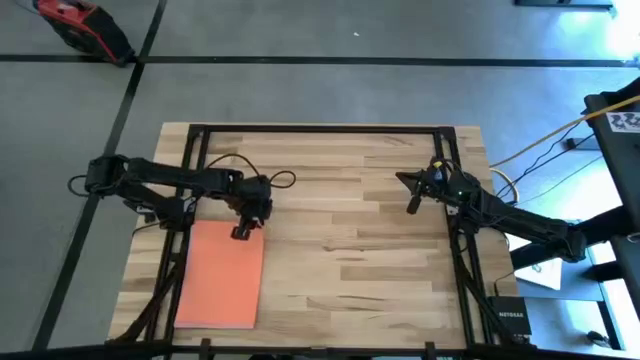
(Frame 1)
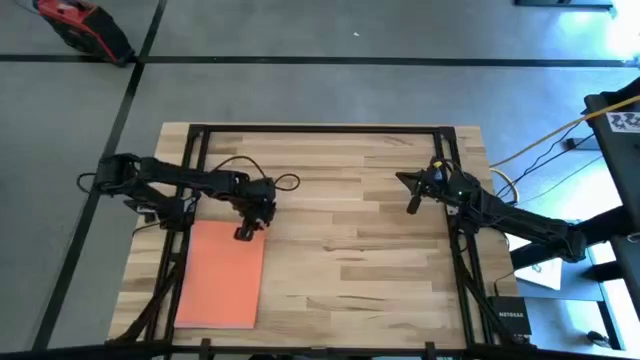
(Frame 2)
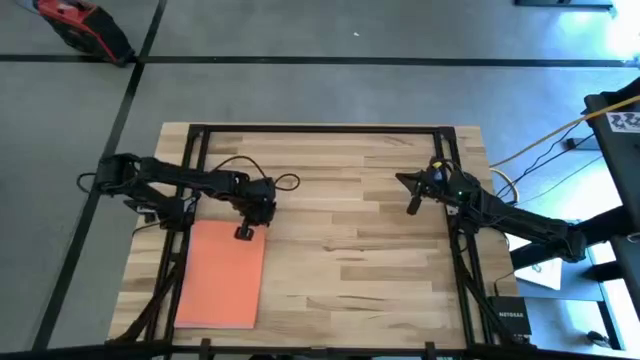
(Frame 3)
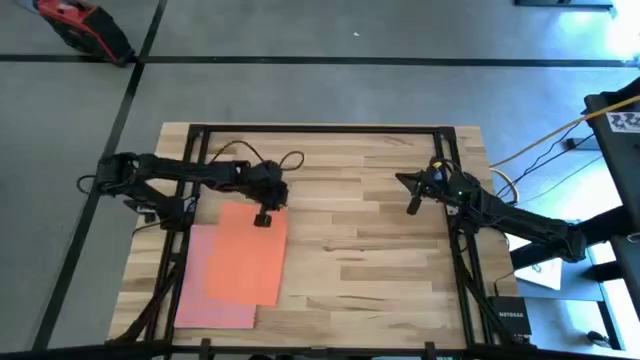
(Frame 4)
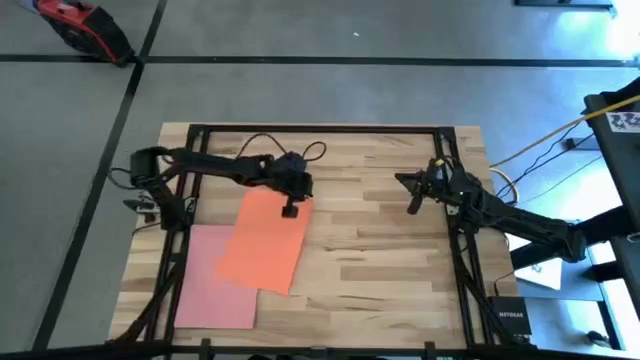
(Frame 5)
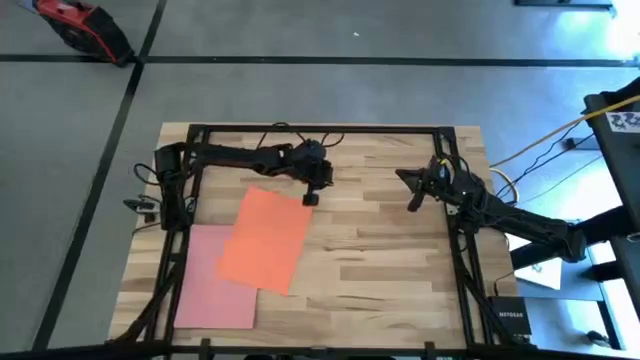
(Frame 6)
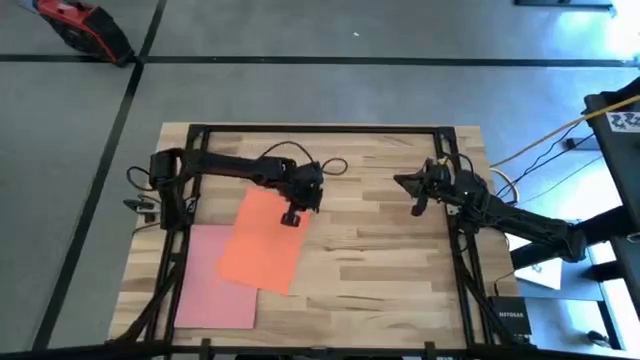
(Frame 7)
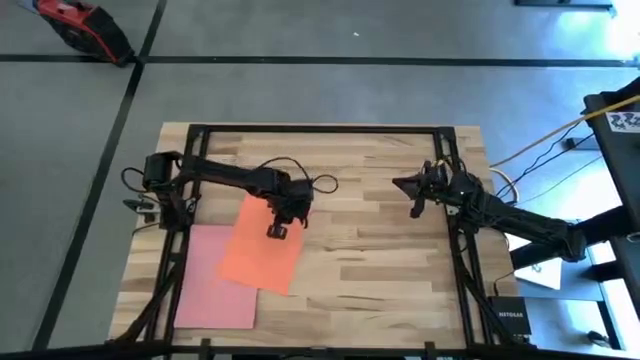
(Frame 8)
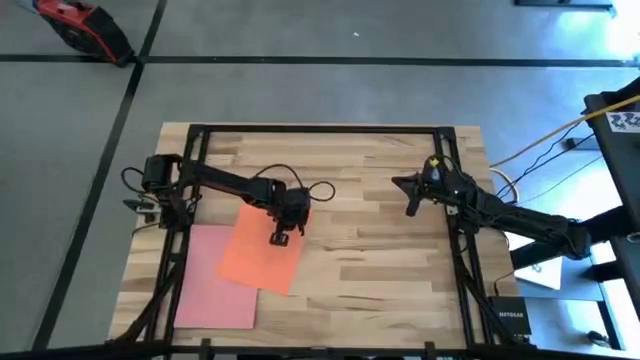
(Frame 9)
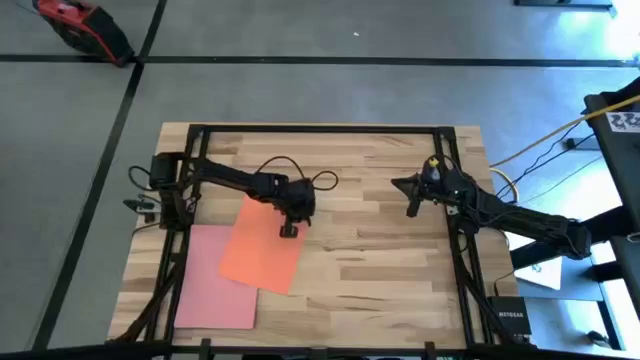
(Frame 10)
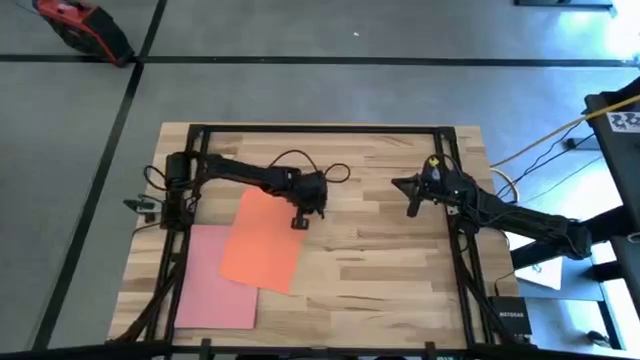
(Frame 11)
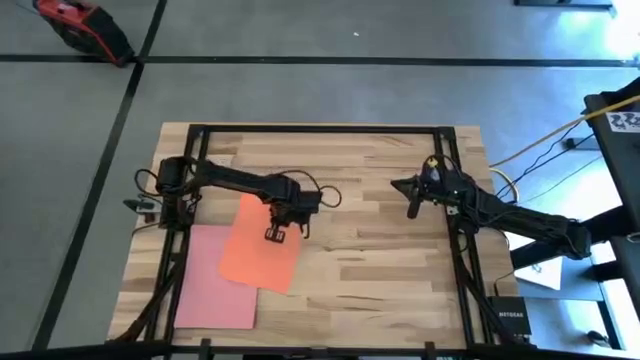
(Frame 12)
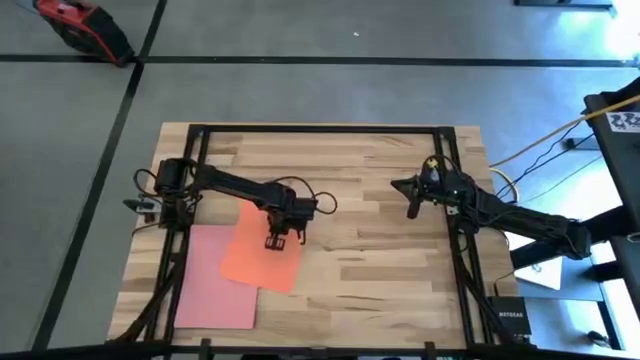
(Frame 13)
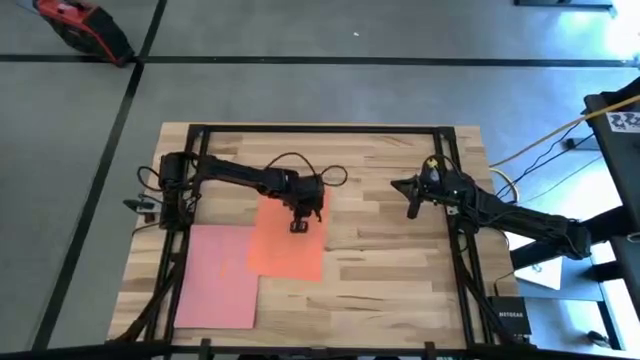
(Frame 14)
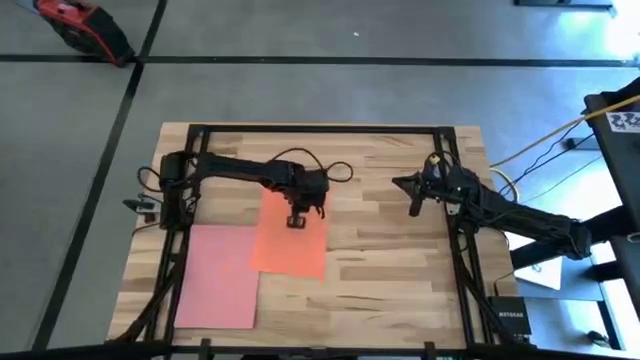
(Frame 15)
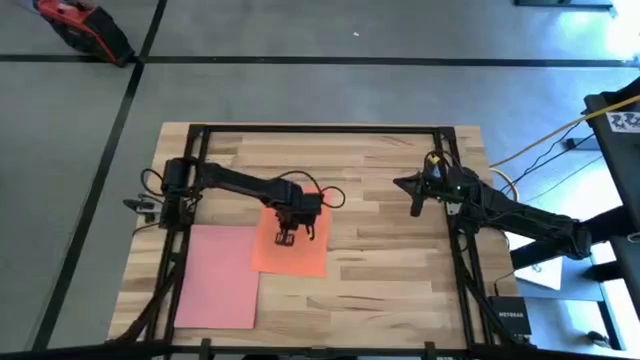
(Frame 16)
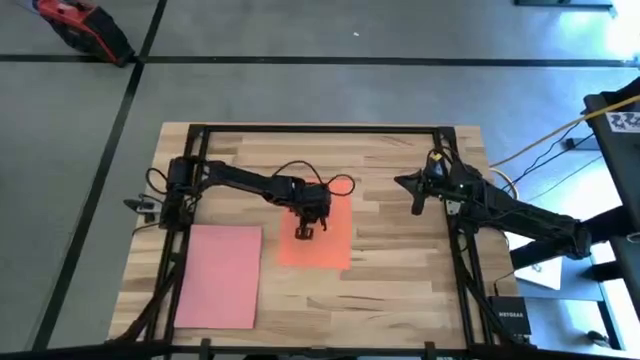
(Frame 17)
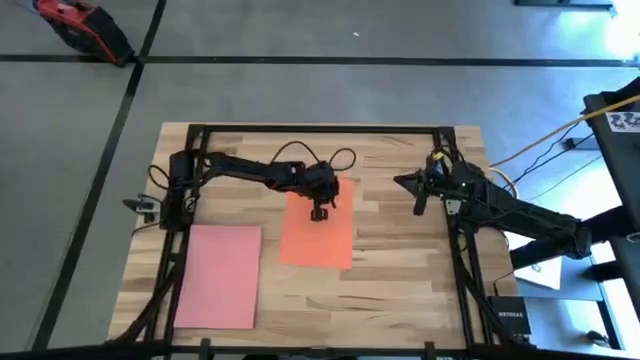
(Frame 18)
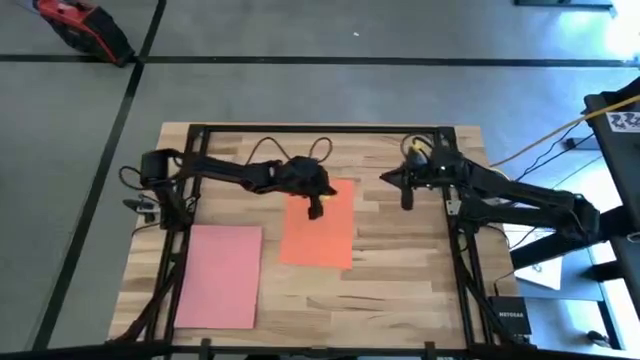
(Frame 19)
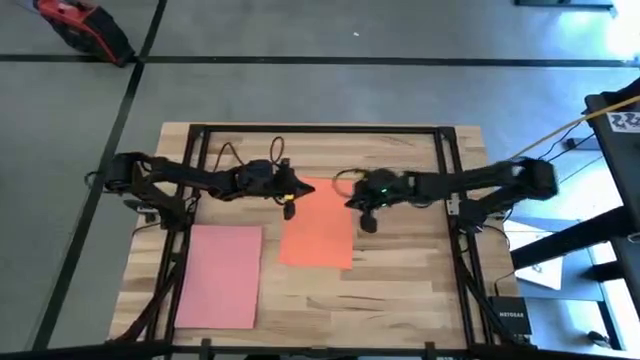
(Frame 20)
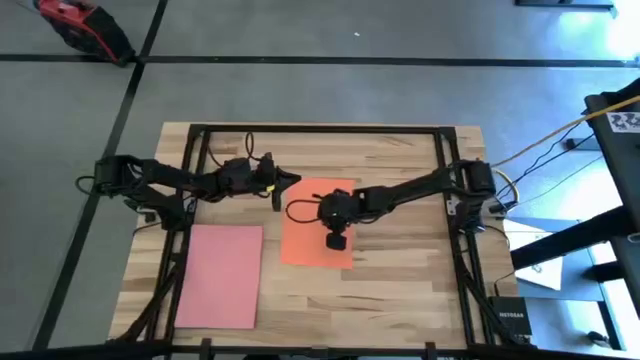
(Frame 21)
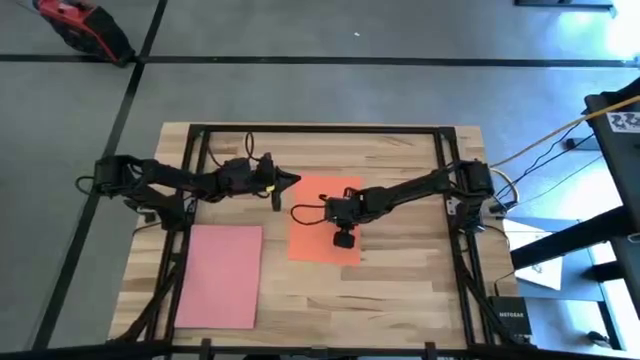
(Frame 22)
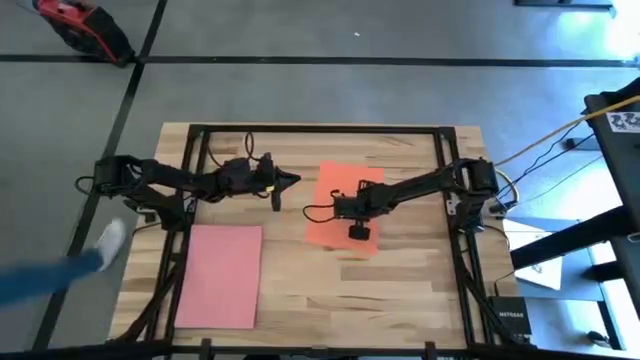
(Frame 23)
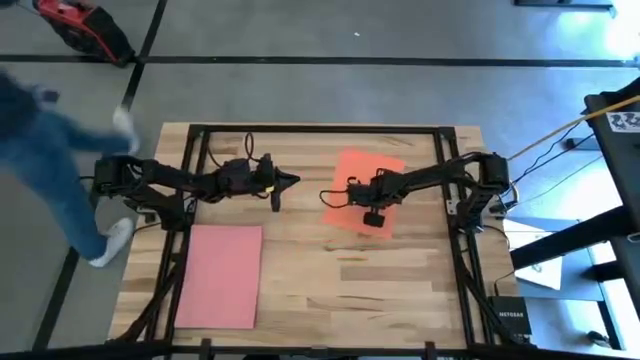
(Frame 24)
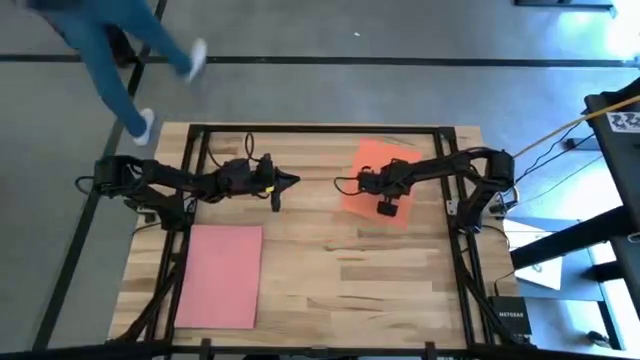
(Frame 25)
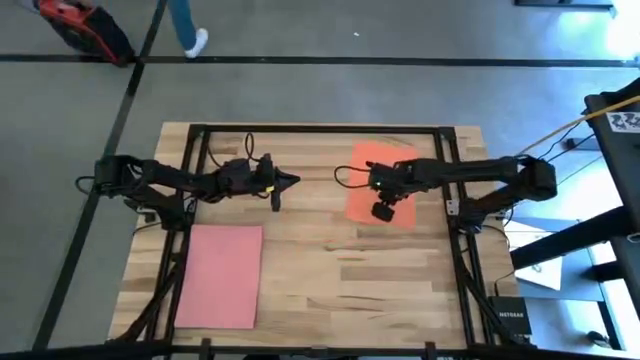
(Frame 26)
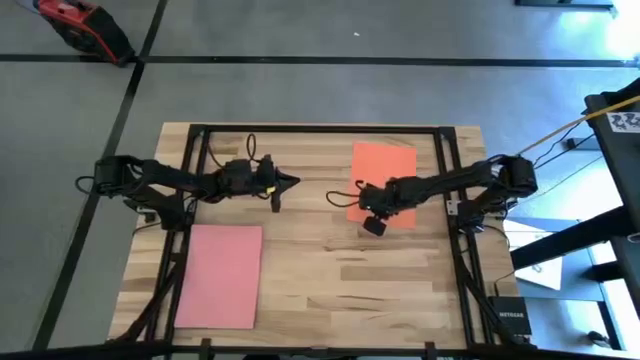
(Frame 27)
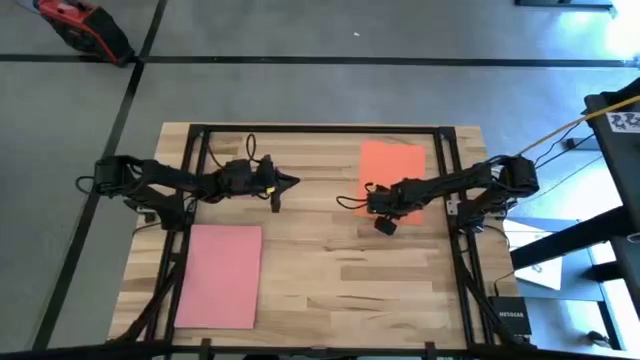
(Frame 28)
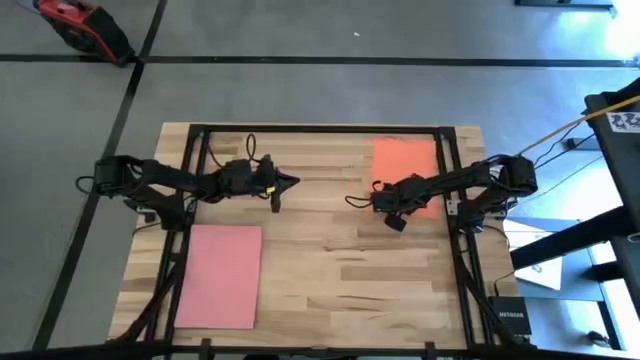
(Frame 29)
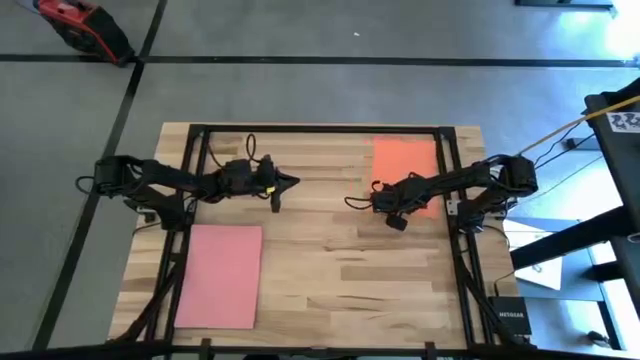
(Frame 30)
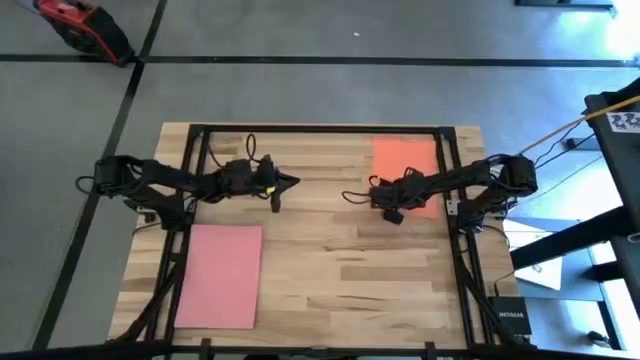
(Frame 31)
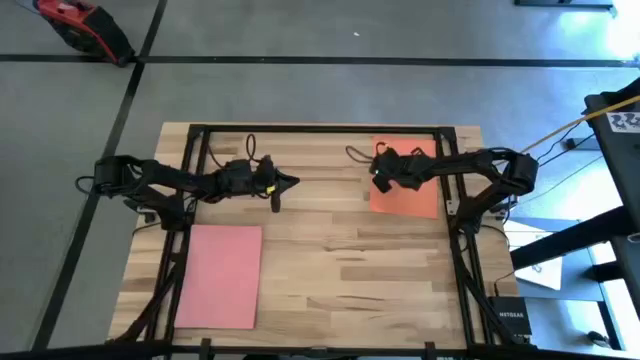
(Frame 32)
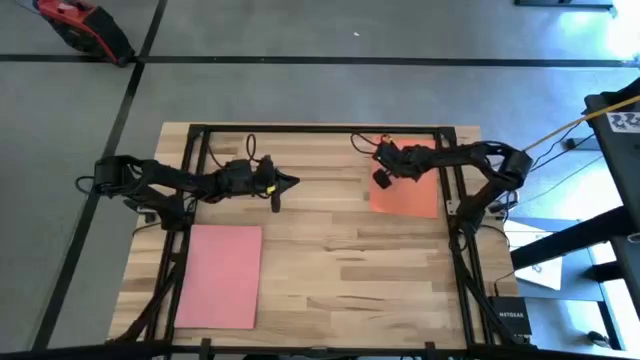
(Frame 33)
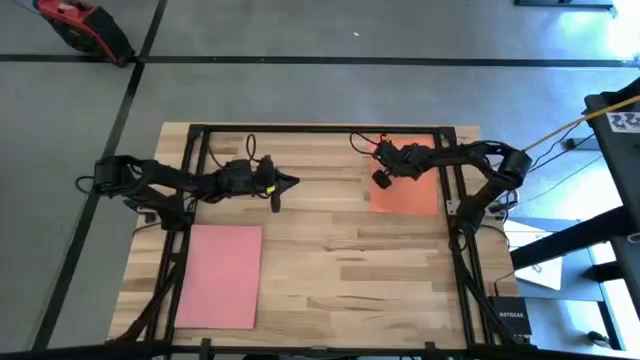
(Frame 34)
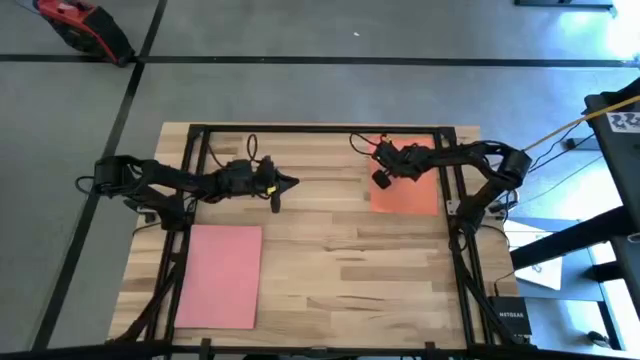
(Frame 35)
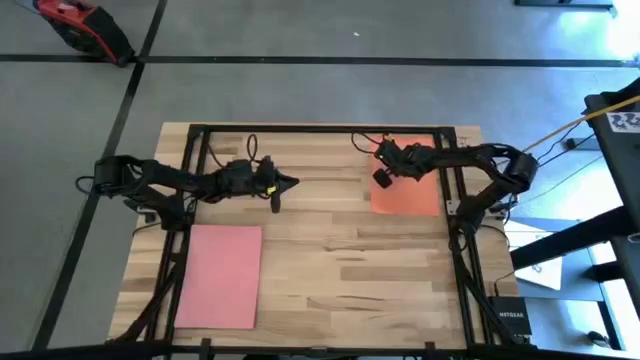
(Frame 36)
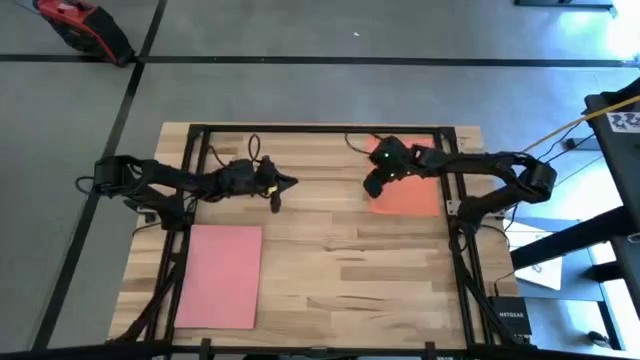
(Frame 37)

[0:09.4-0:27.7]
Task: Organize paper
Move the orange paper from bottom left to the top right table
